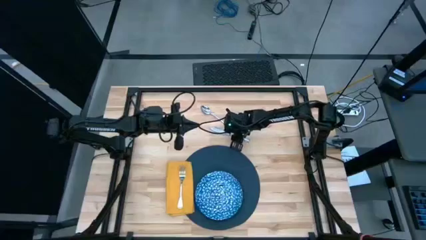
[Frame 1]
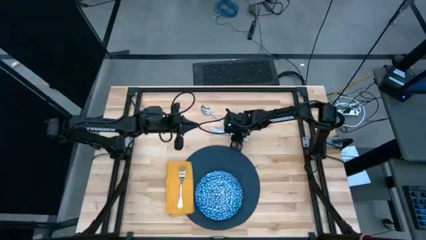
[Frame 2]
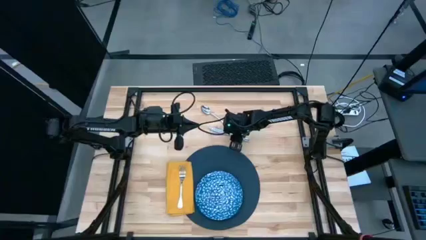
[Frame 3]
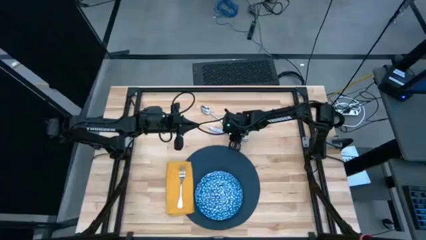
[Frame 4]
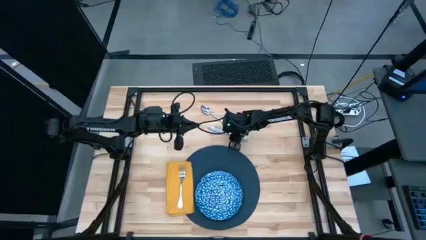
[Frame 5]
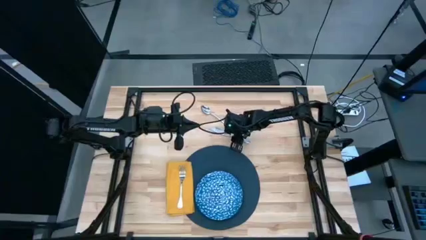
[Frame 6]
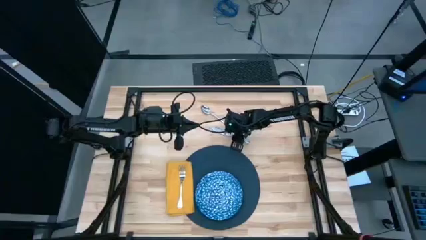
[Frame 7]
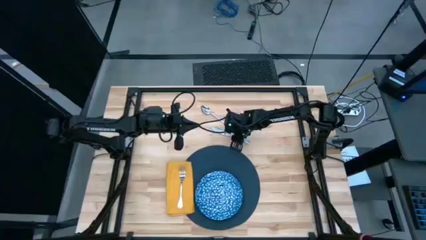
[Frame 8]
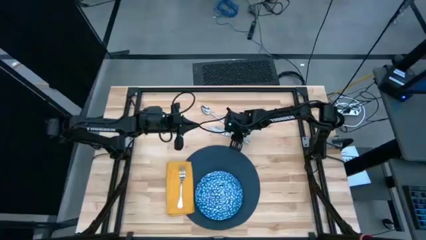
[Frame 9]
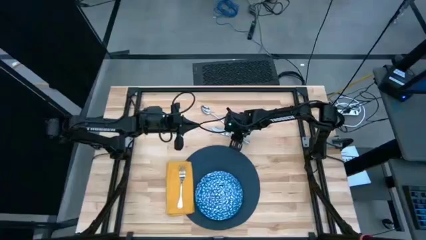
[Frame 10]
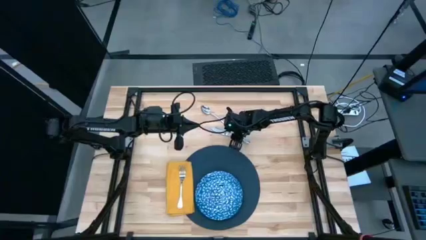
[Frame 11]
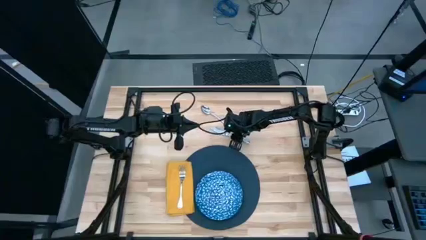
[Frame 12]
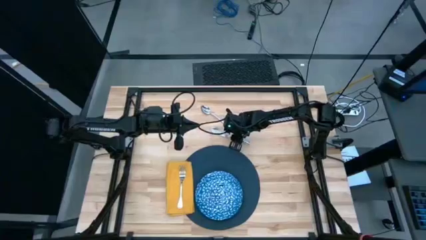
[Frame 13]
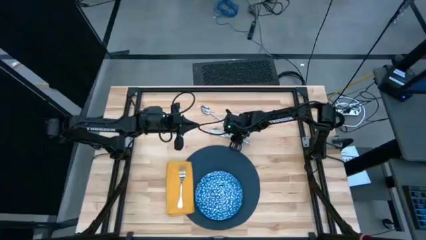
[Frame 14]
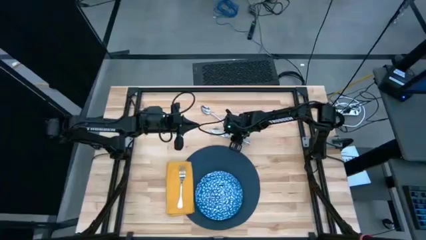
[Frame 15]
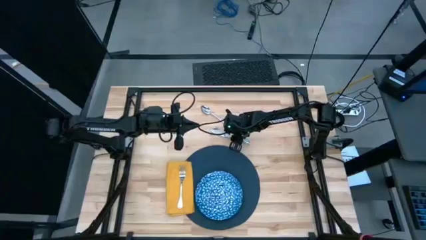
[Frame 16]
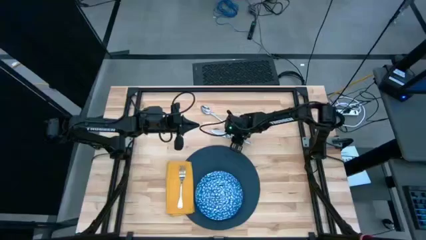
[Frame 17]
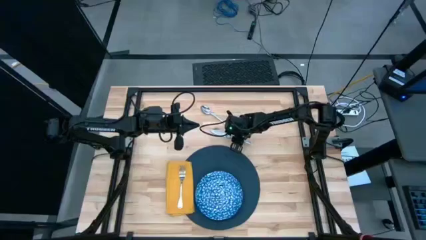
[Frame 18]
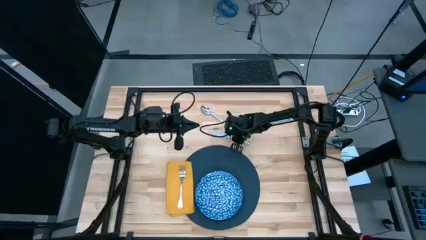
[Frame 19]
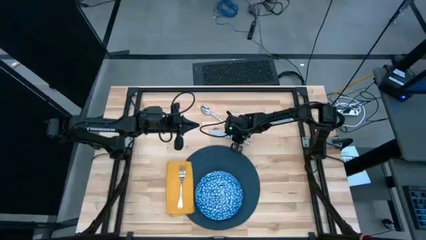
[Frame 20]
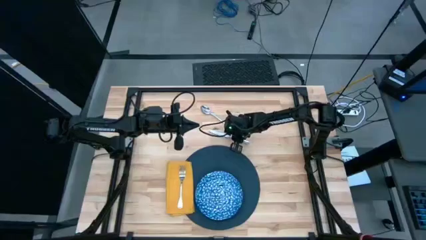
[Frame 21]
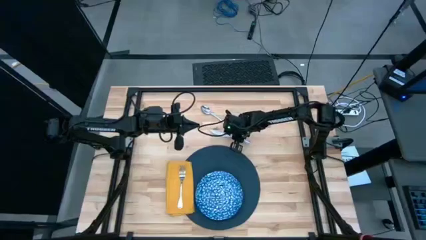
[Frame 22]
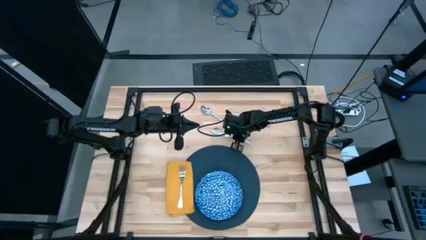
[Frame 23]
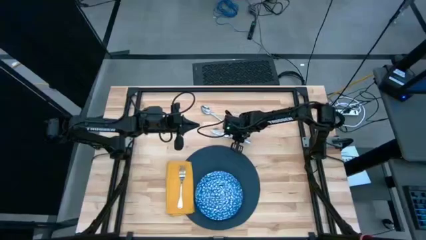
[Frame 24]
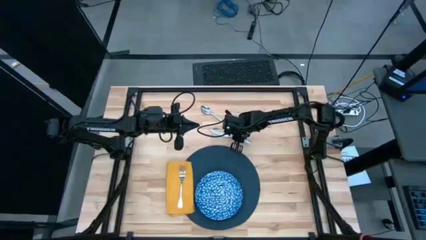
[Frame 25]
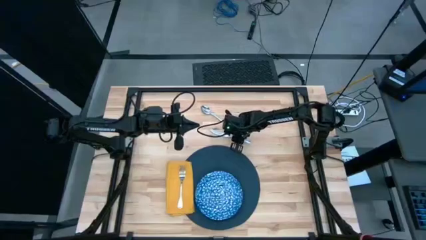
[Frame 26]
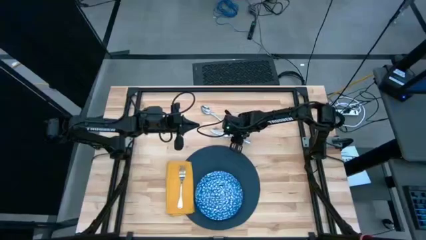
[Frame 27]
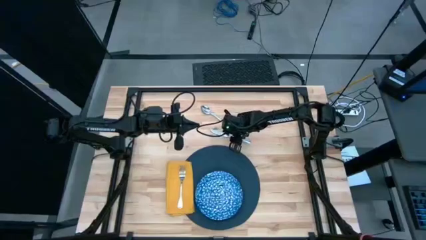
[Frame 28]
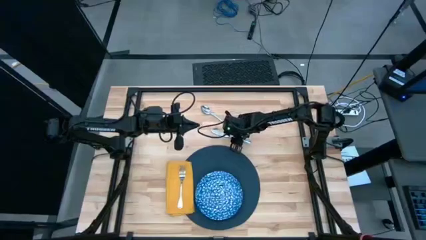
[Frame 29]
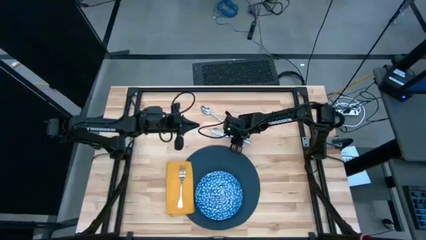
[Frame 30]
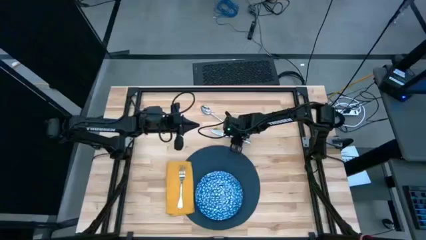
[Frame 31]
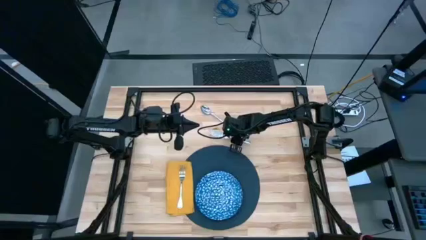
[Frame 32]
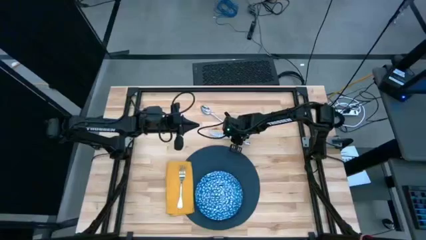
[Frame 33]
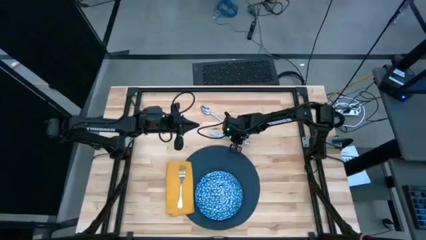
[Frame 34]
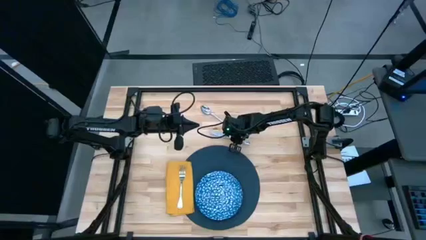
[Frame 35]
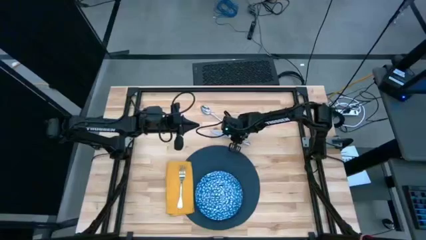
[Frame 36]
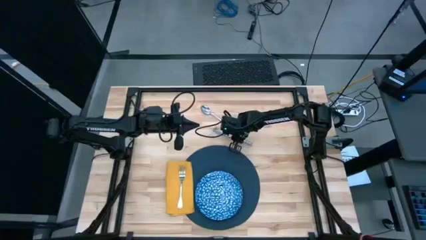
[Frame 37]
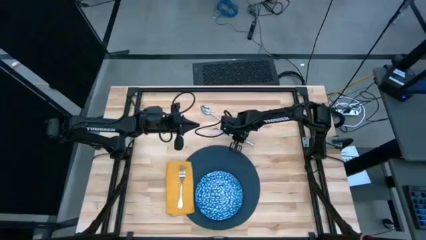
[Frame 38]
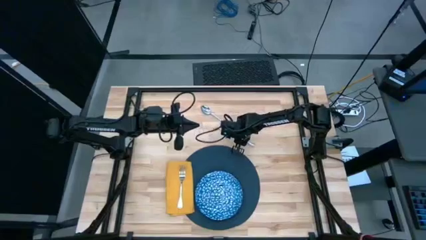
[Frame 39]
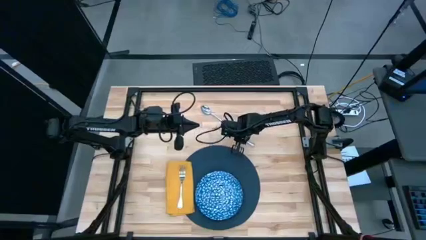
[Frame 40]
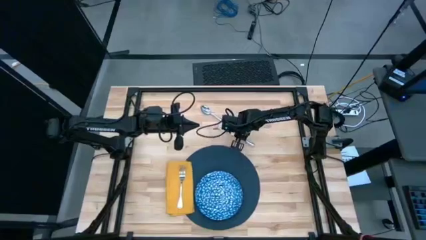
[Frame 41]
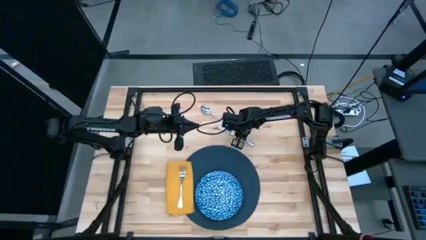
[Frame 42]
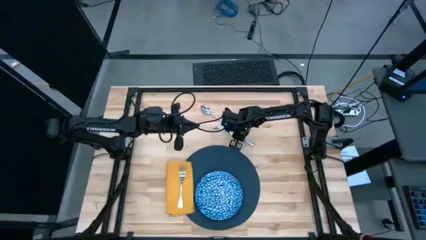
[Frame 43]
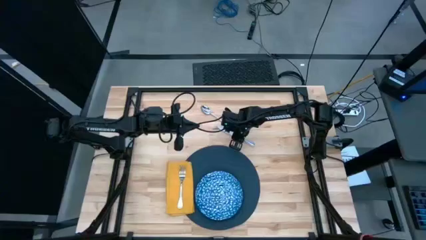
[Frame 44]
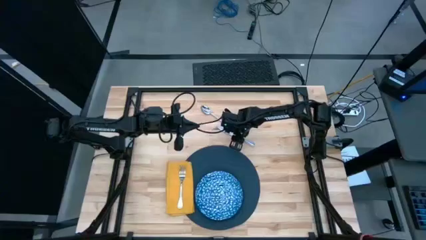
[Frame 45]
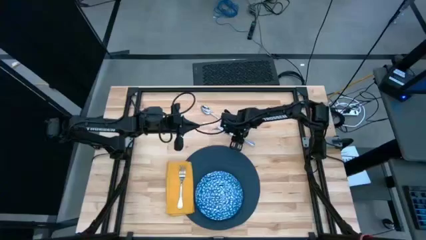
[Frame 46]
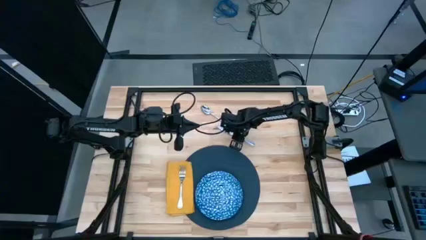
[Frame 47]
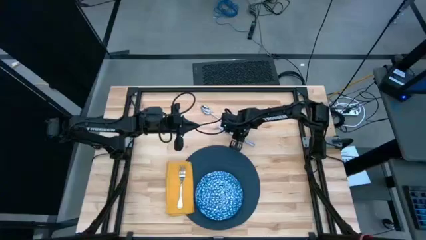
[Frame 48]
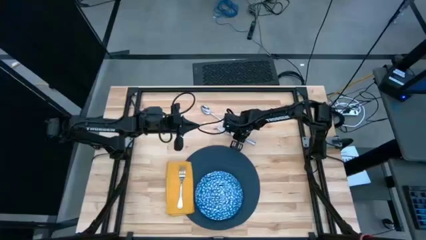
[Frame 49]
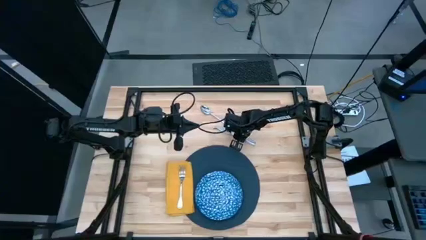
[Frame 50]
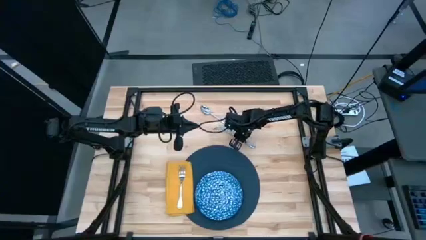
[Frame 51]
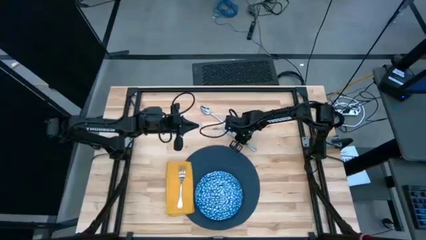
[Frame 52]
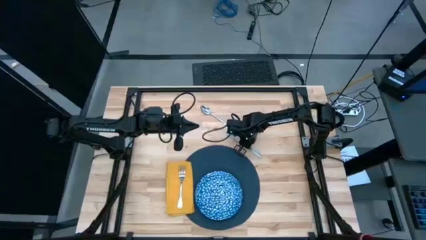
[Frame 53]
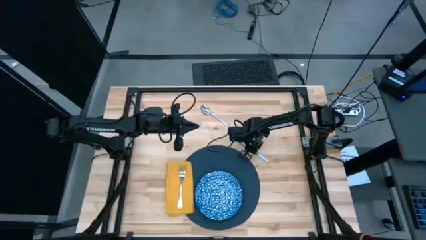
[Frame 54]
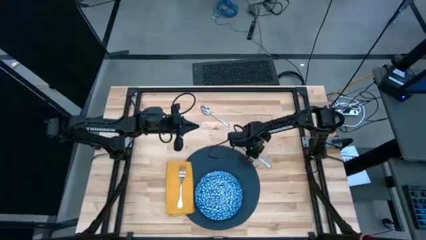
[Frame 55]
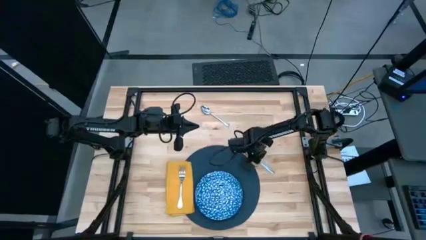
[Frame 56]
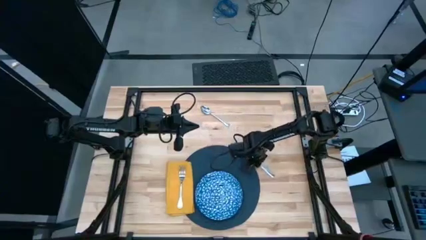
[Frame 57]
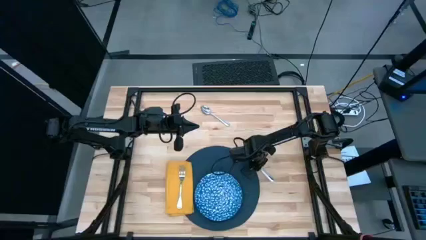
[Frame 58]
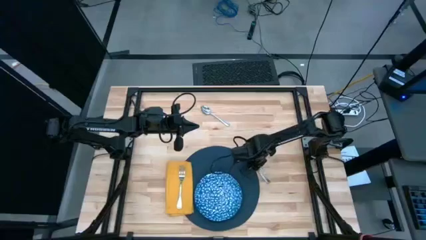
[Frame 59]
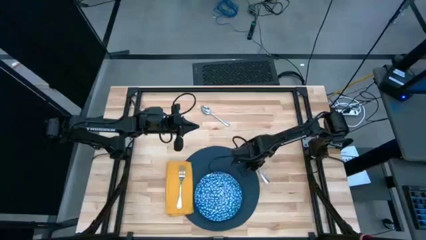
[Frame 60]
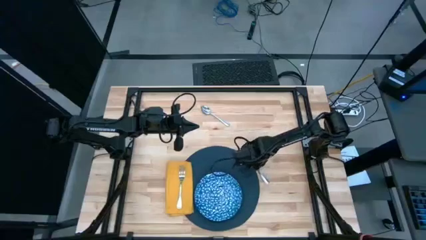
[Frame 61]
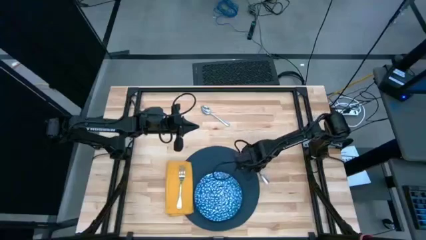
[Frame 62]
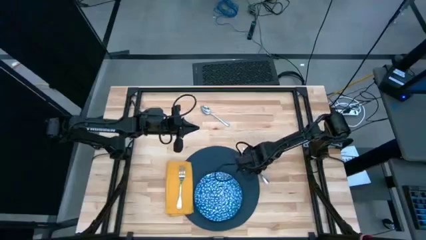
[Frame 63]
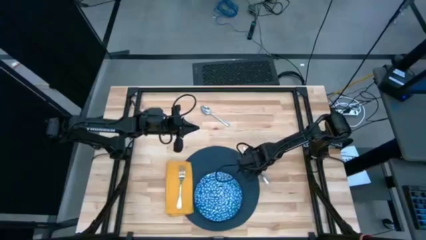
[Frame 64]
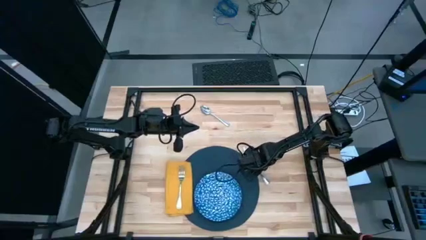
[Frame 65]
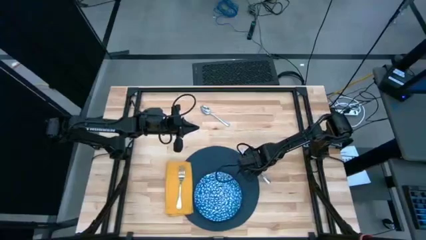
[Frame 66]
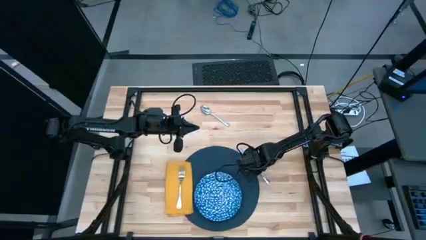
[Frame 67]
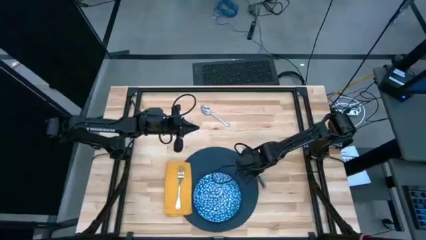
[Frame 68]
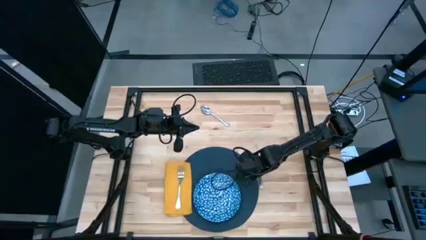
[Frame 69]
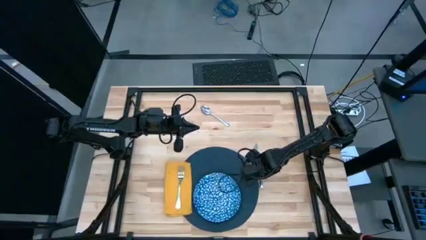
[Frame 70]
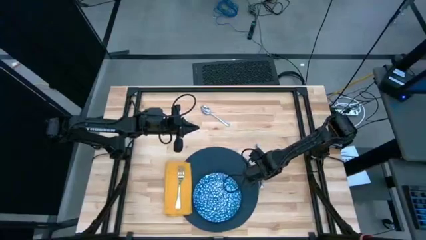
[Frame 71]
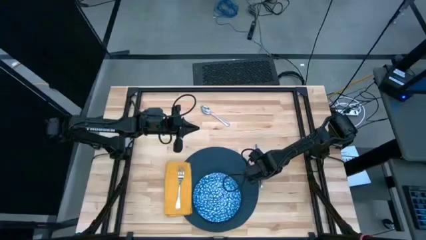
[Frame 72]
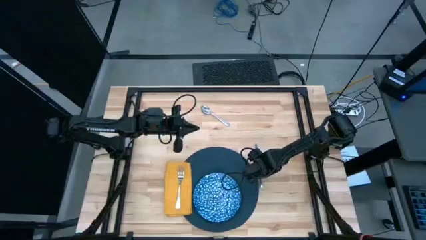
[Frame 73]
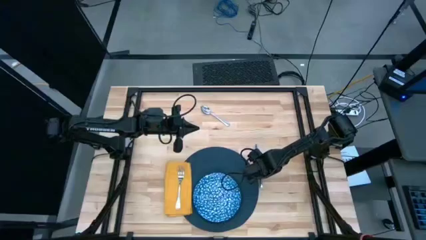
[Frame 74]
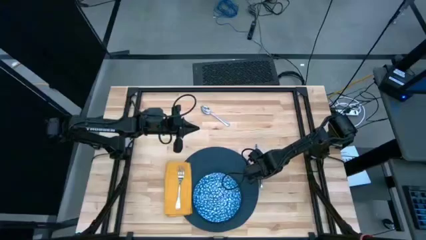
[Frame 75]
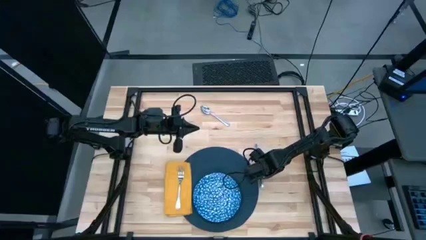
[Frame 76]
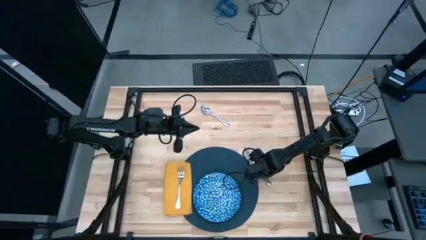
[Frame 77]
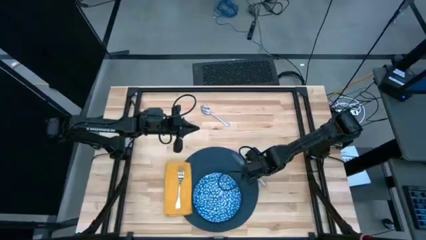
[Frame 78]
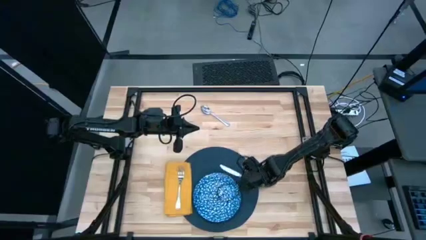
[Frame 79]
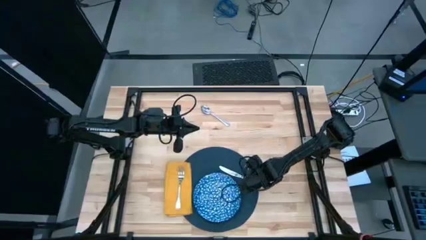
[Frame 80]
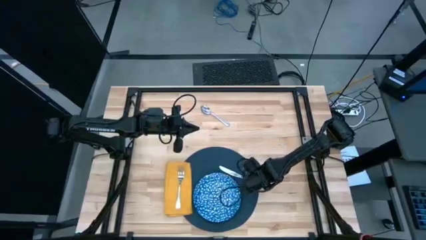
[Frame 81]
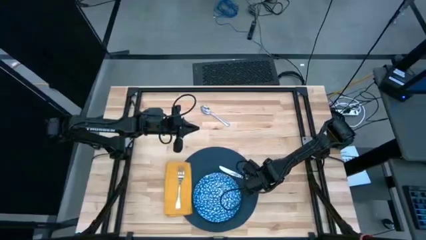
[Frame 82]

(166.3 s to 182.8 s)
Task: Set table place
Put the silver table knife on the blue table mat to the right of the blue plate
